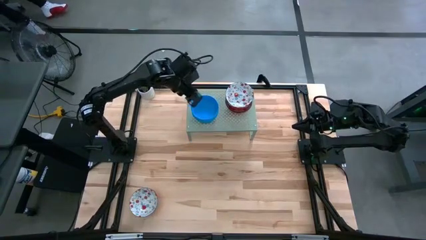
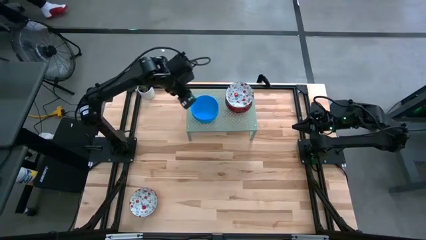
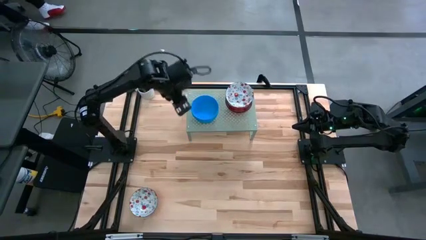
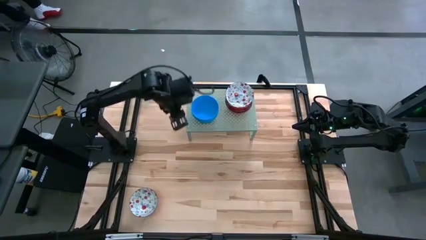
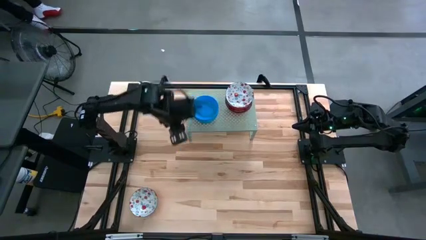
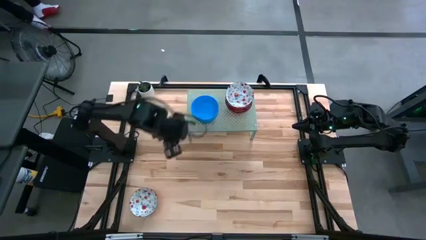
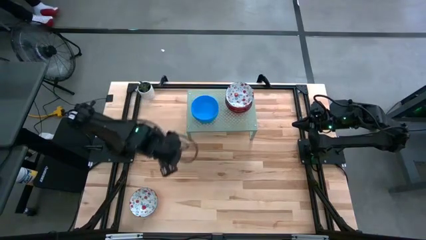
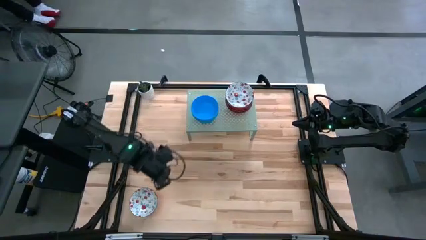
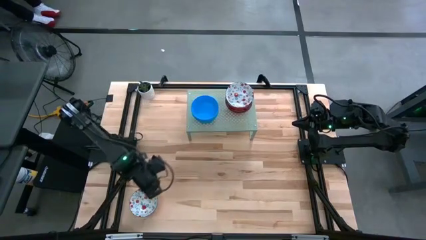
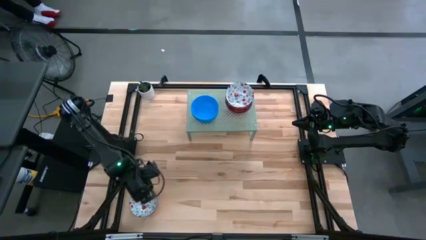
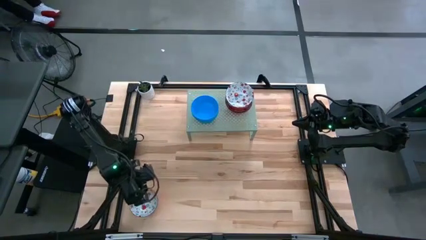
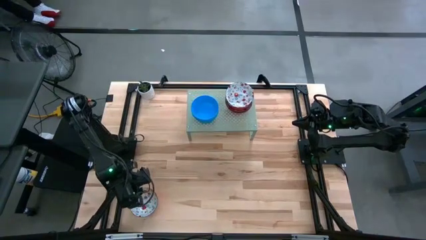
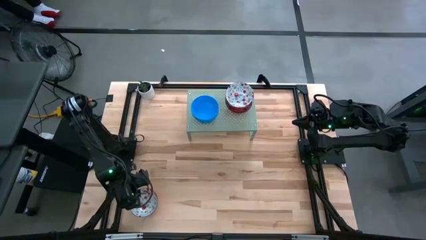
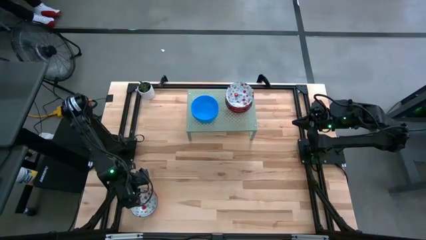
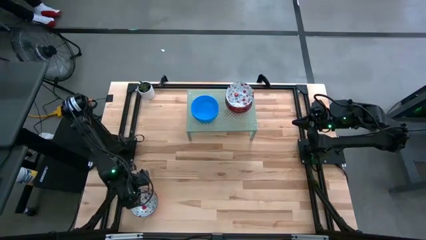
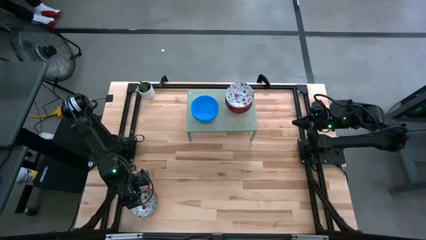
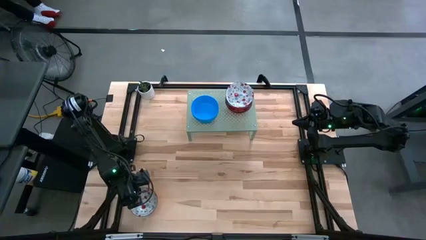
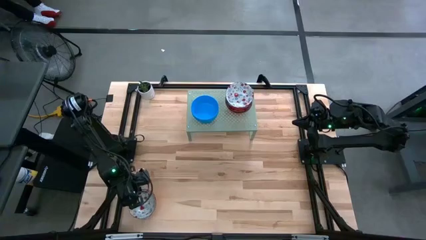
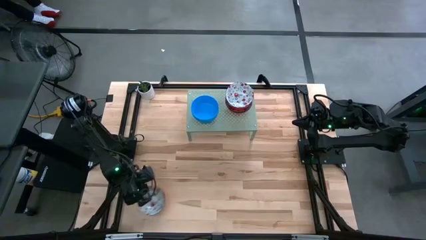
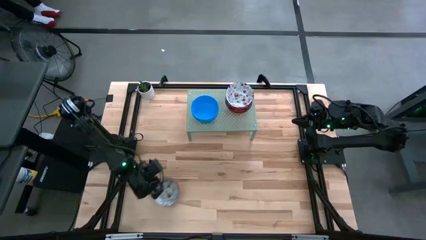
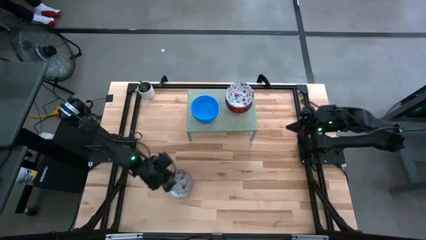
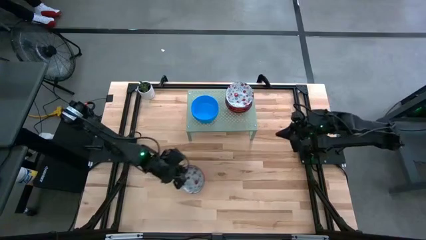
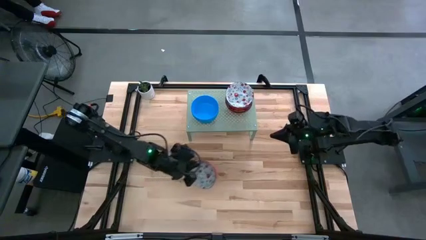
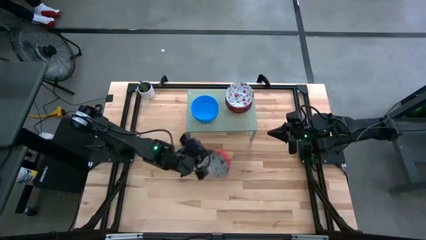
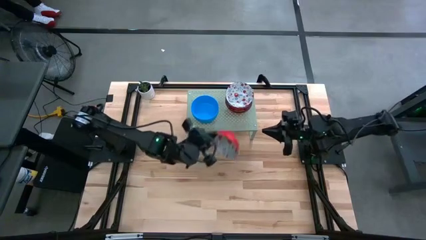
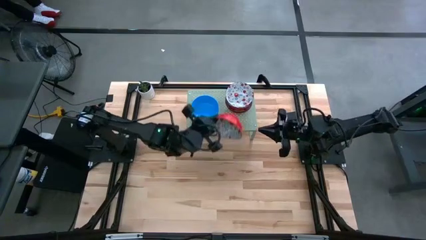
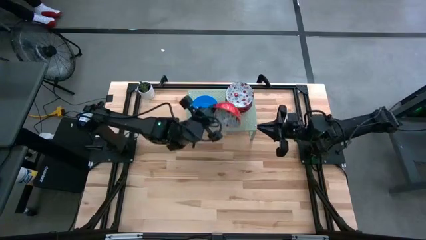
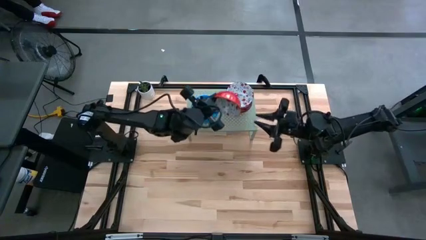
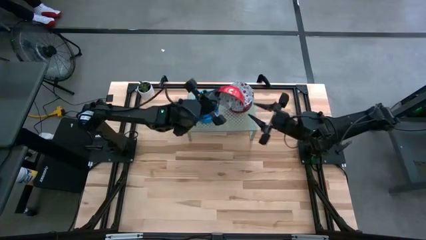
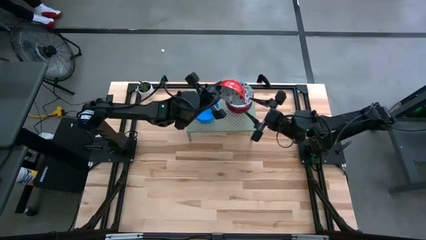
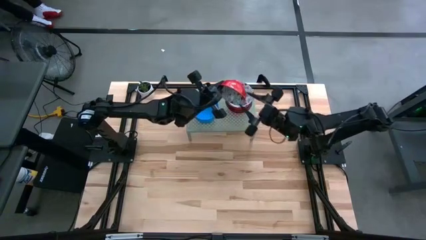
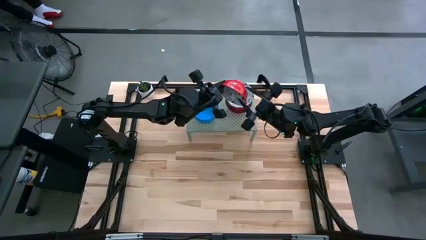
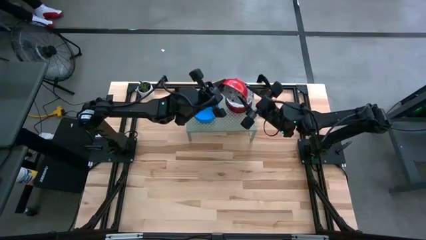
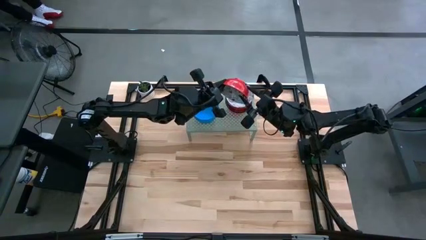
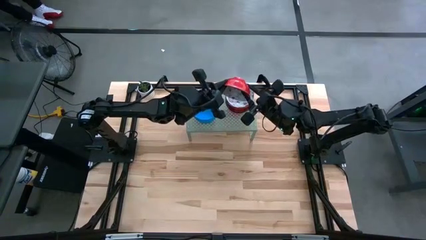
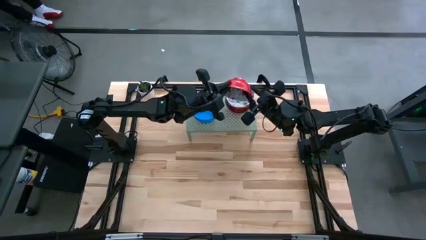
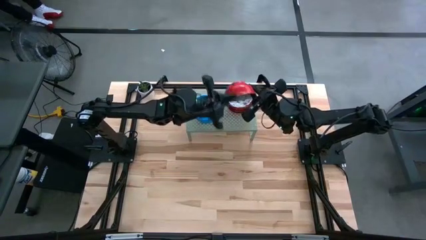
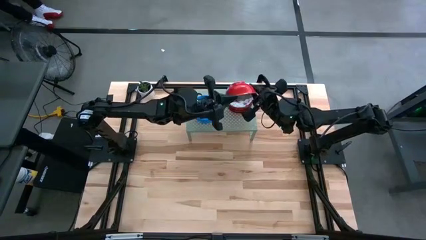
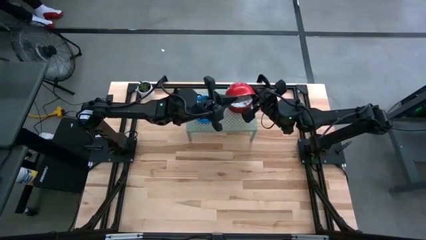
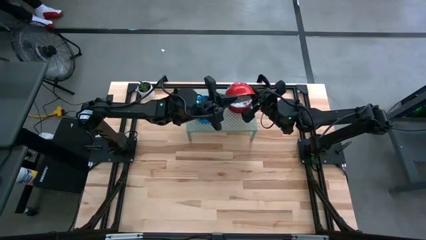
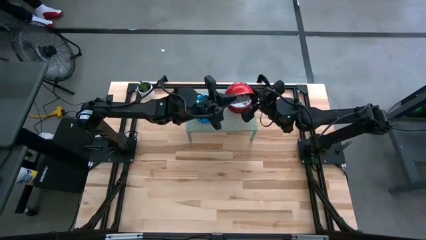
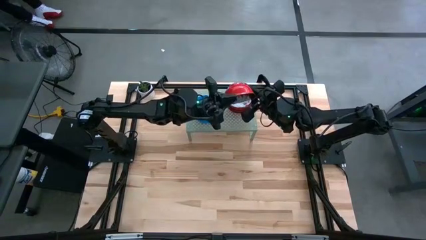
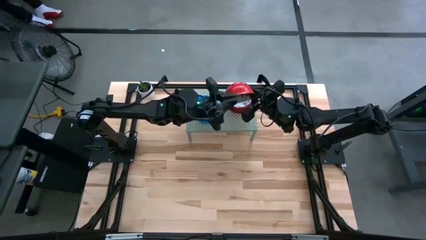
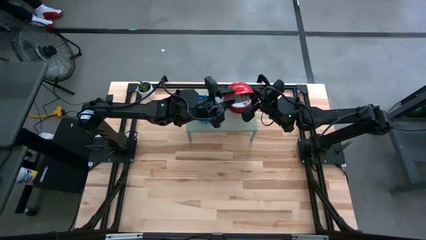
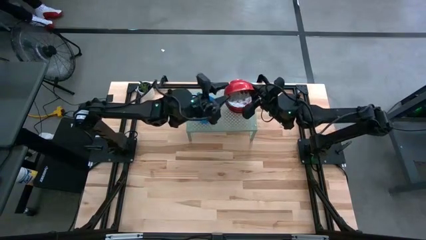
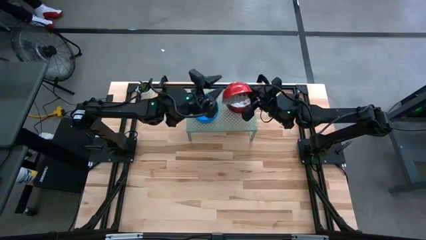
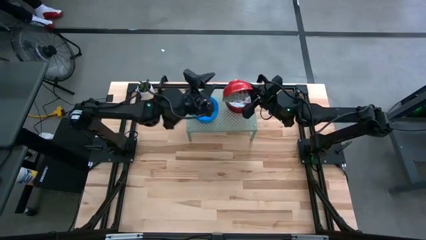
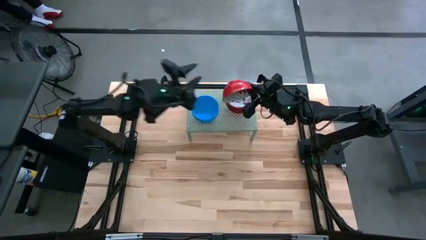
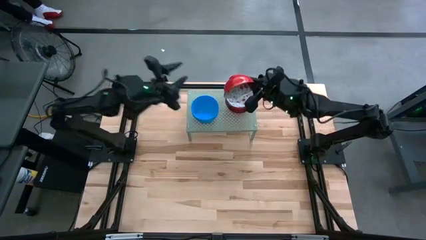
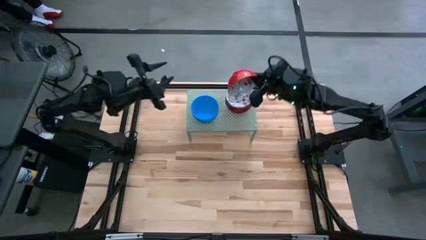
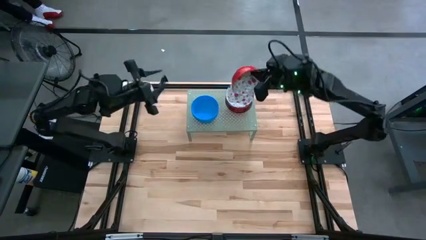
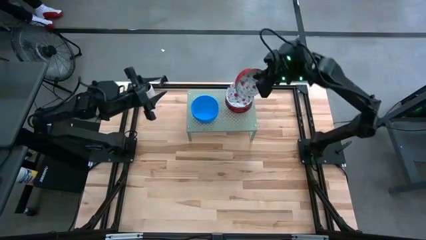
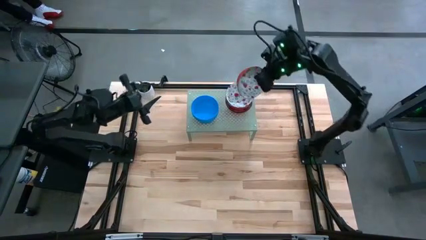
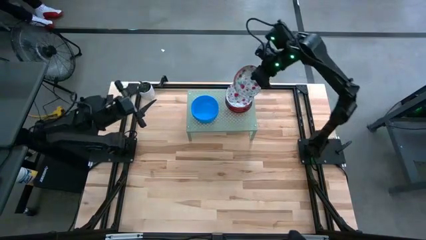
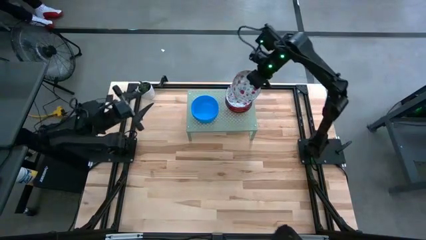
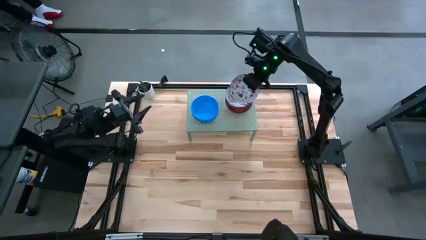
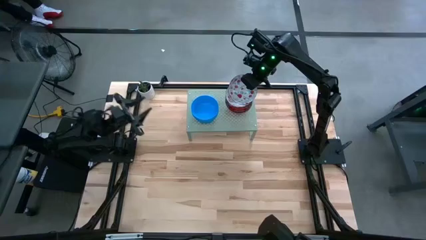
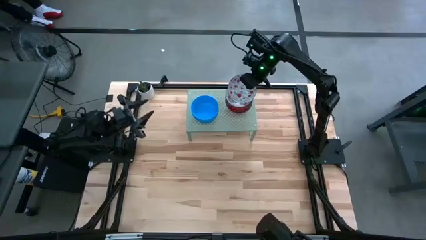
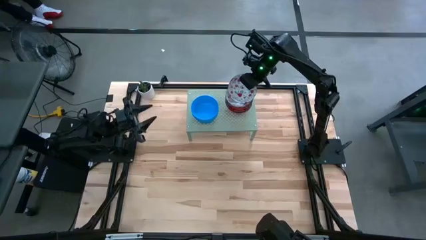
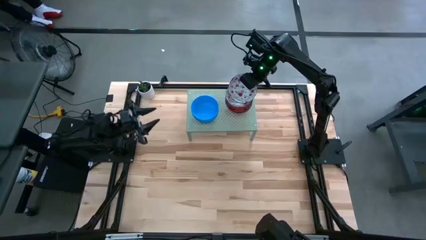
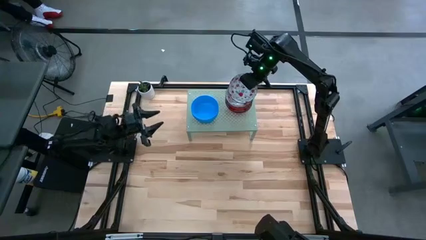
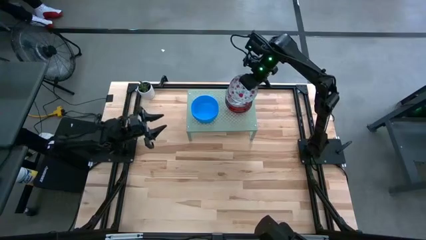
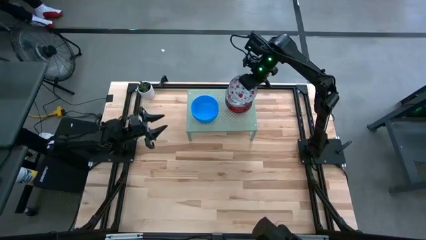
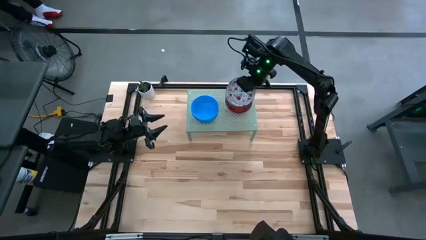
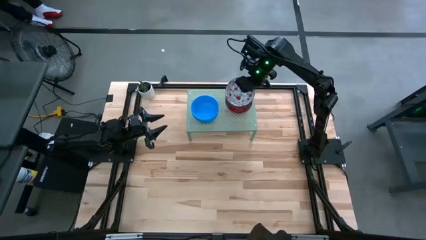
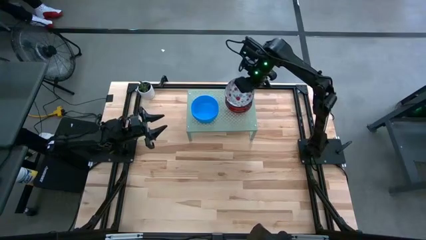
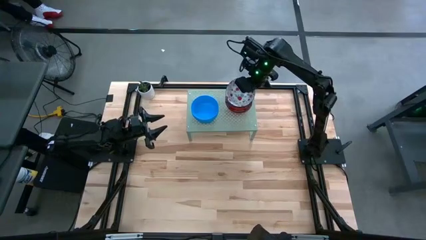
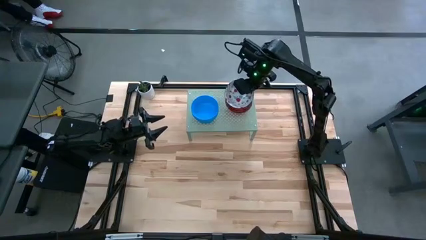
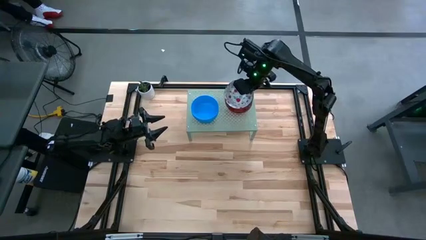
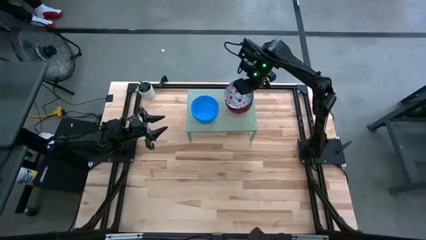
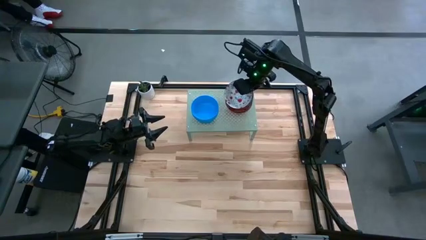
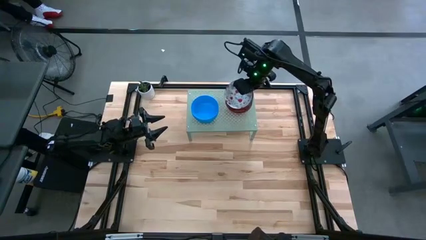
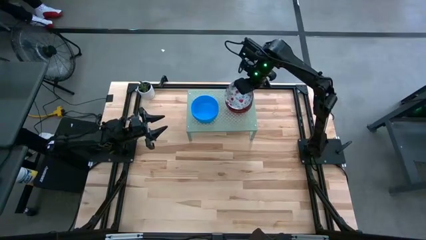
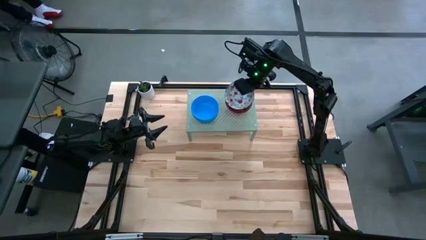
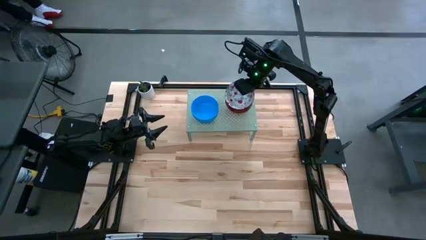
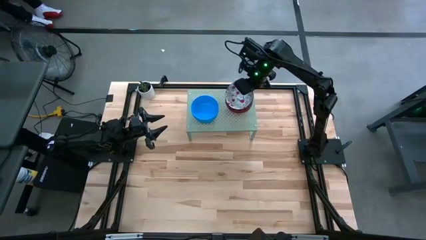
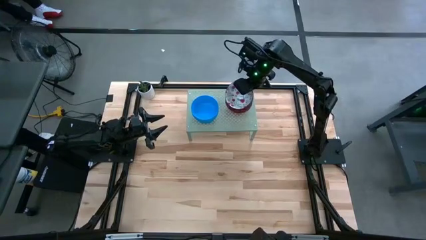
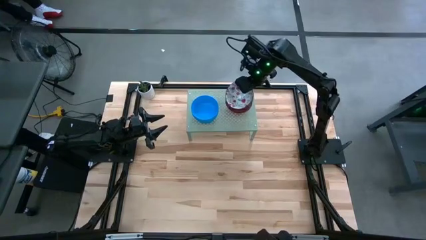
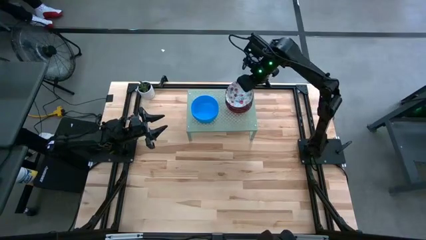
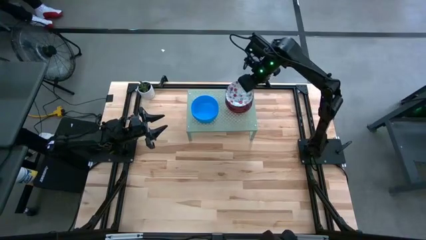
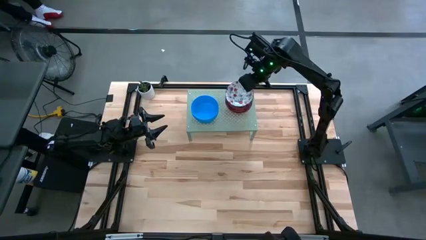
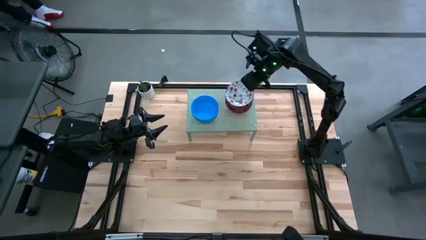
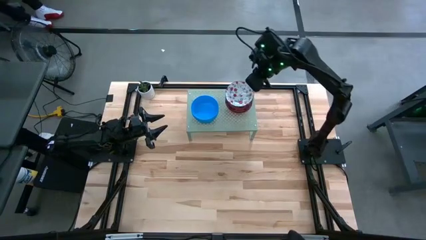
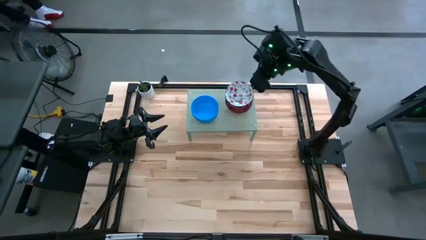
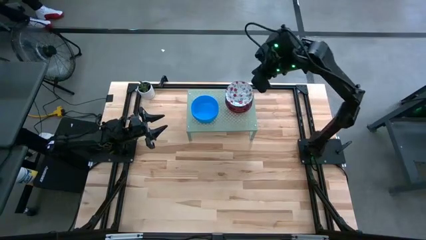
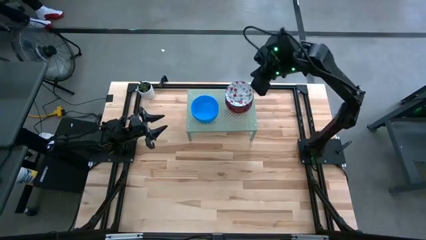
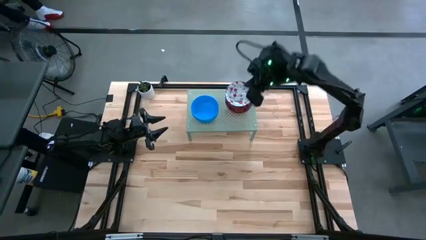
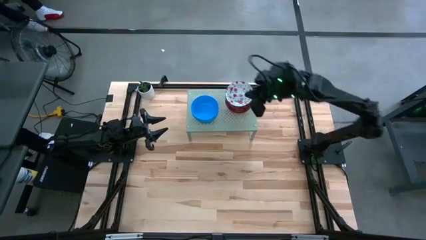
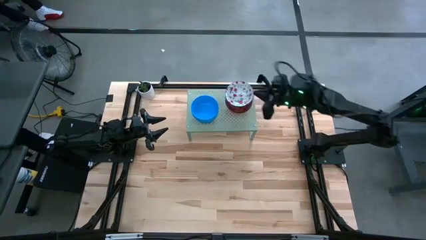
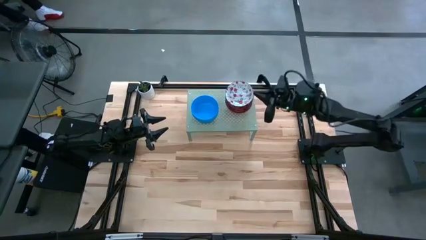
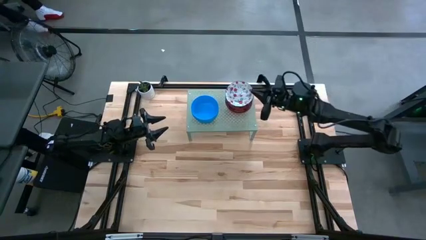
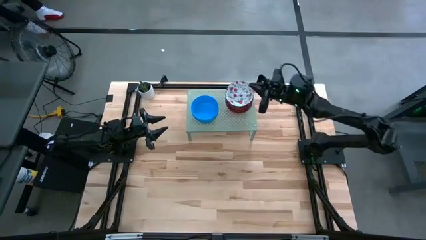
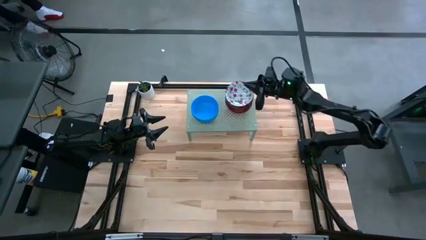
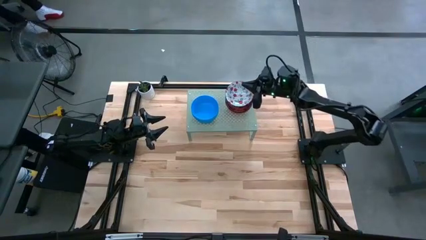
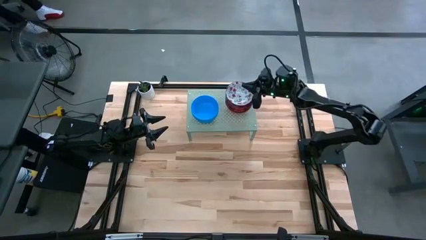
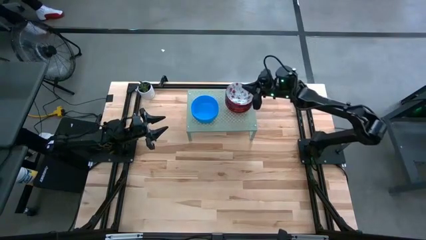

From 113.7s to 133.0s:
Task: Pick & Place Mini bowls
Stack the red bowl on top of the red bowls on the shelf
